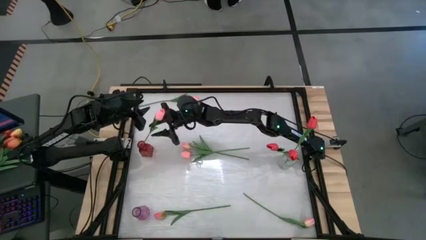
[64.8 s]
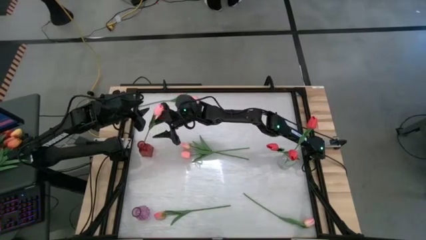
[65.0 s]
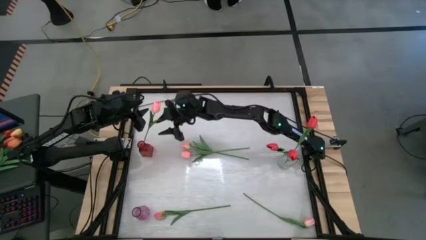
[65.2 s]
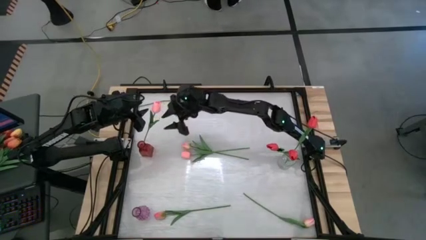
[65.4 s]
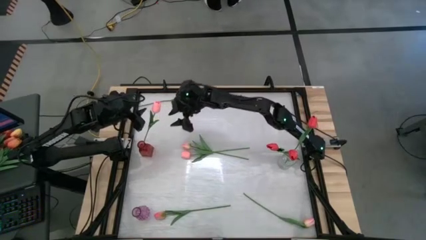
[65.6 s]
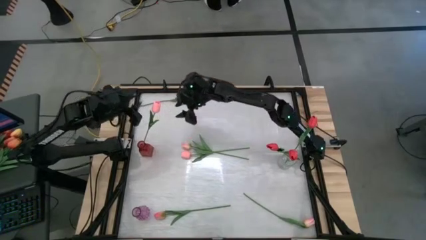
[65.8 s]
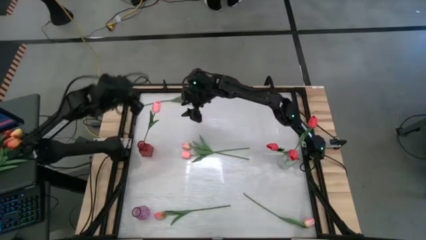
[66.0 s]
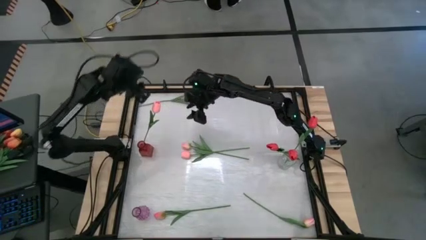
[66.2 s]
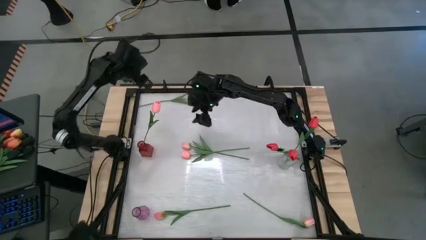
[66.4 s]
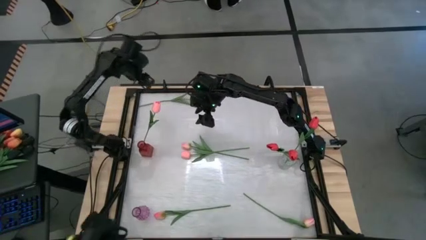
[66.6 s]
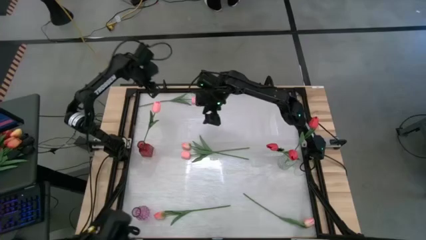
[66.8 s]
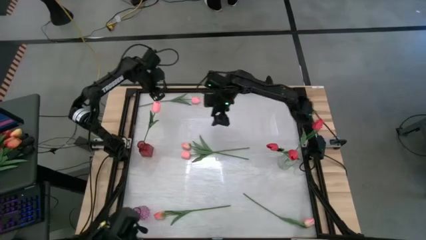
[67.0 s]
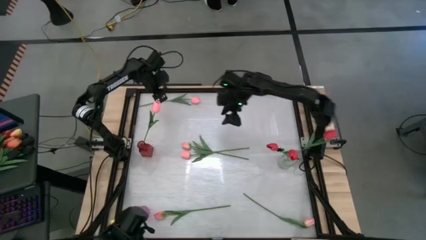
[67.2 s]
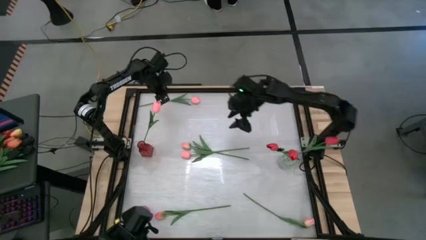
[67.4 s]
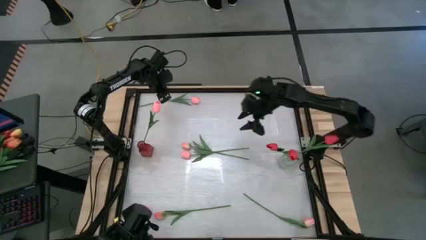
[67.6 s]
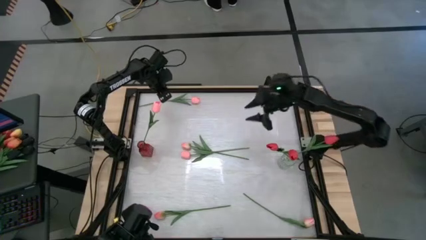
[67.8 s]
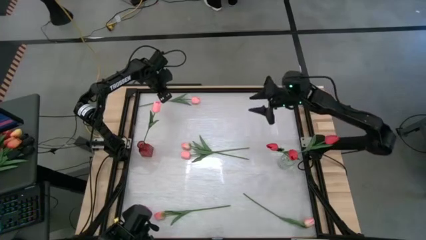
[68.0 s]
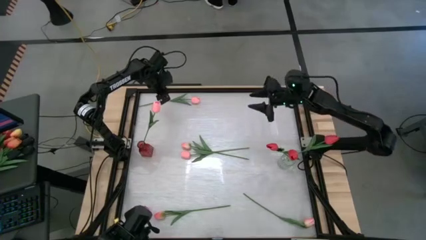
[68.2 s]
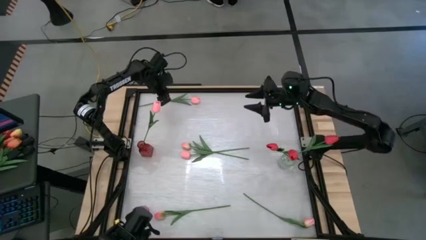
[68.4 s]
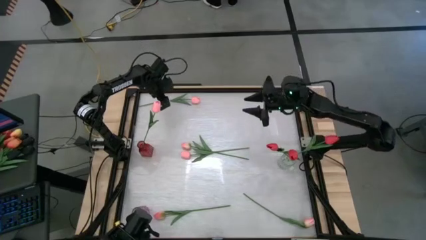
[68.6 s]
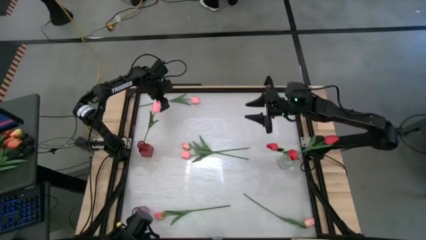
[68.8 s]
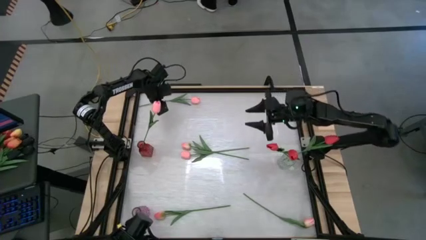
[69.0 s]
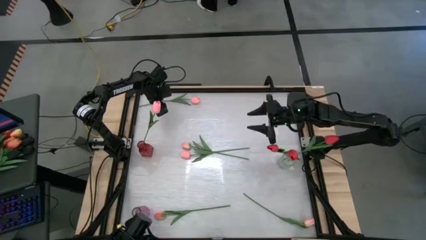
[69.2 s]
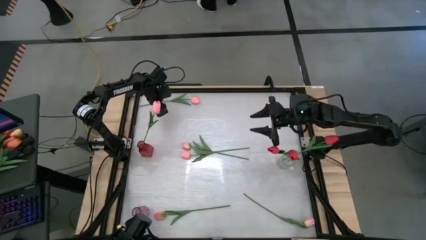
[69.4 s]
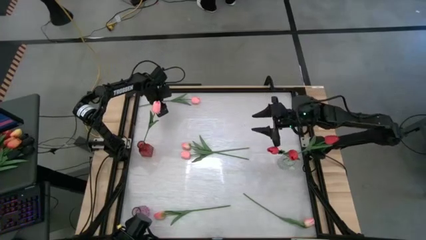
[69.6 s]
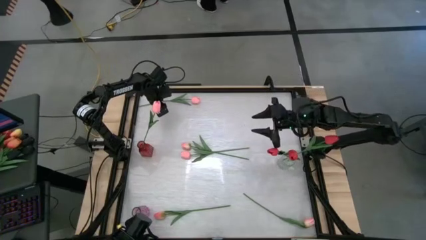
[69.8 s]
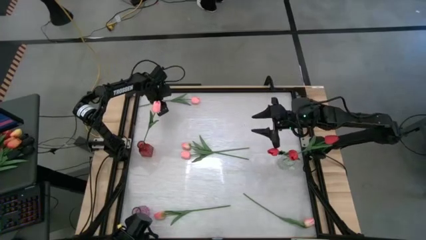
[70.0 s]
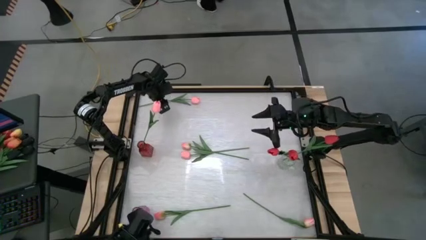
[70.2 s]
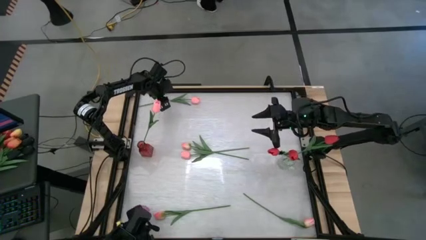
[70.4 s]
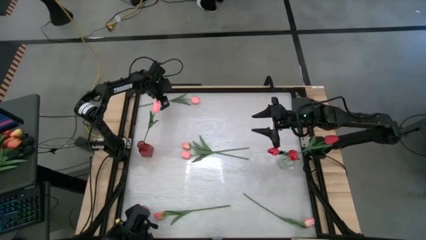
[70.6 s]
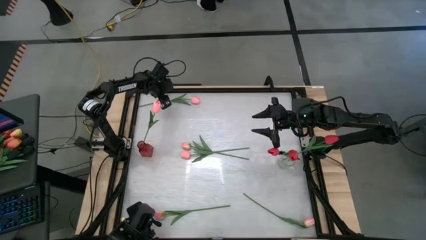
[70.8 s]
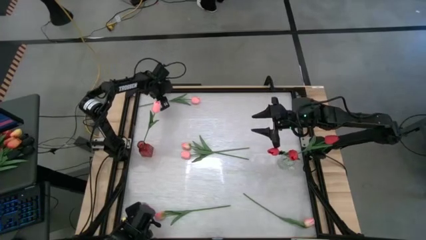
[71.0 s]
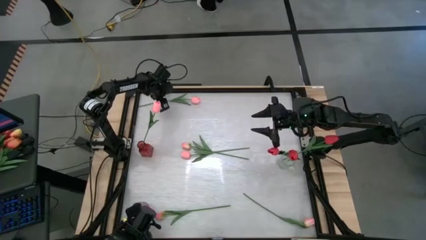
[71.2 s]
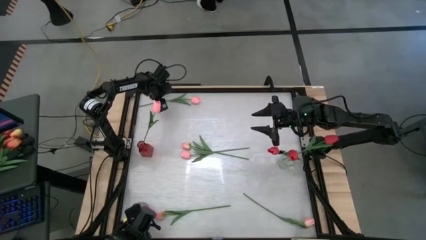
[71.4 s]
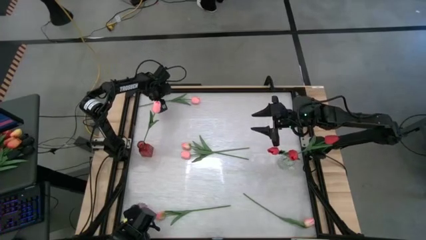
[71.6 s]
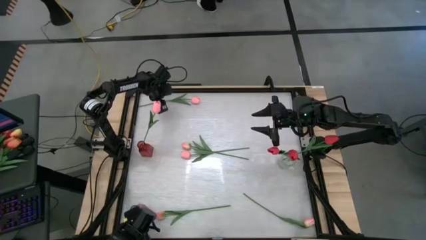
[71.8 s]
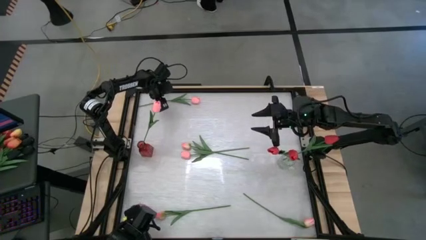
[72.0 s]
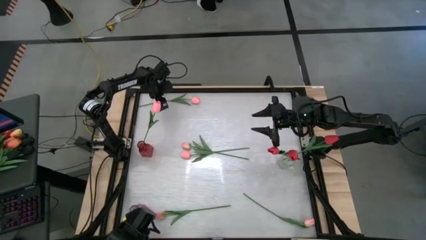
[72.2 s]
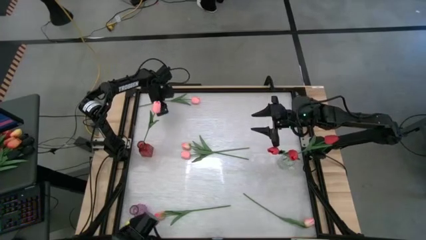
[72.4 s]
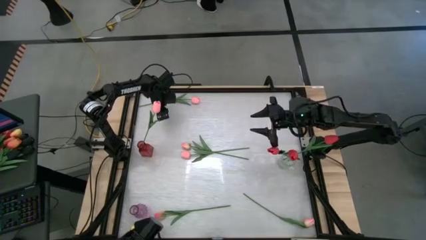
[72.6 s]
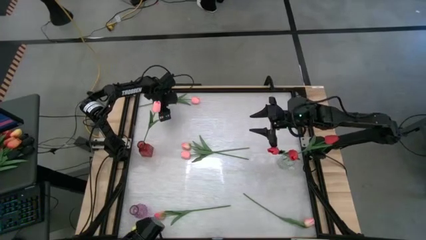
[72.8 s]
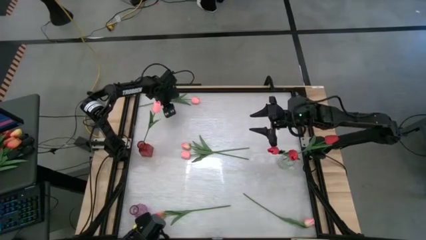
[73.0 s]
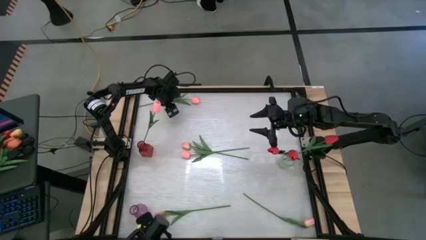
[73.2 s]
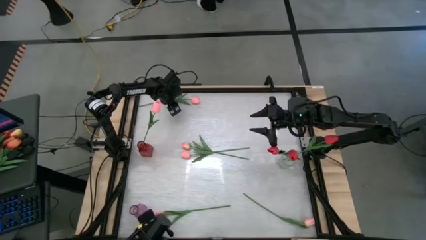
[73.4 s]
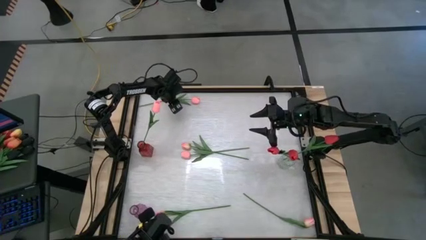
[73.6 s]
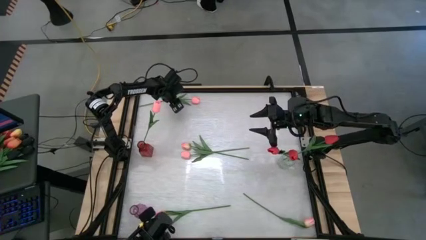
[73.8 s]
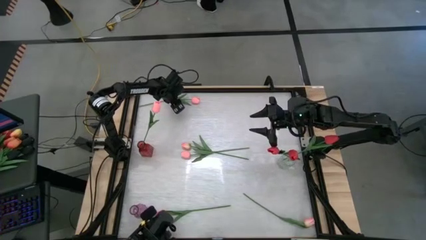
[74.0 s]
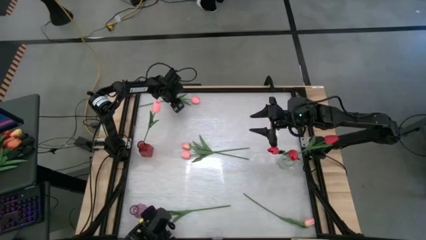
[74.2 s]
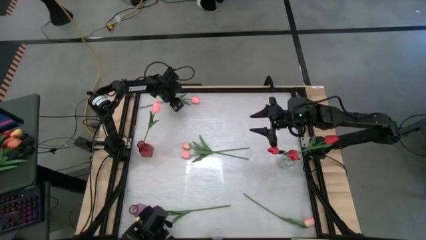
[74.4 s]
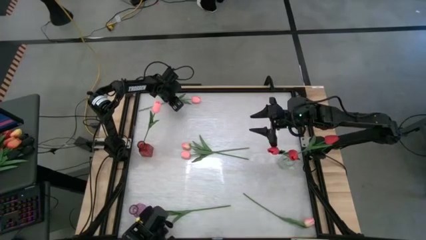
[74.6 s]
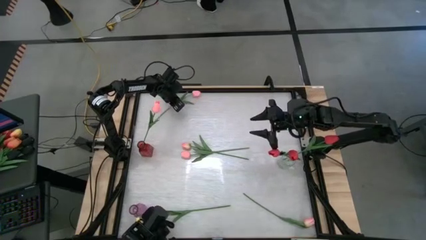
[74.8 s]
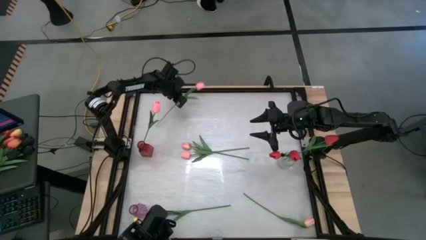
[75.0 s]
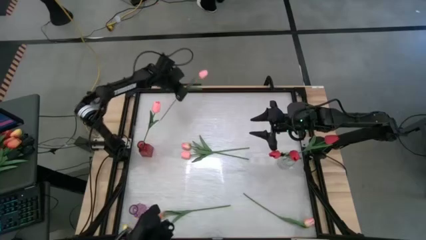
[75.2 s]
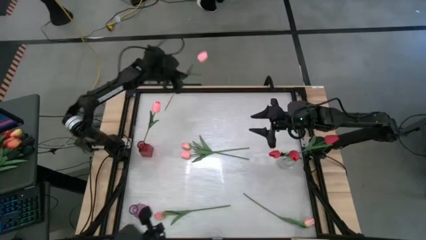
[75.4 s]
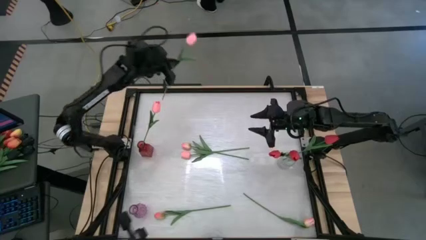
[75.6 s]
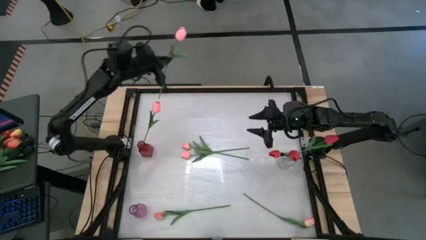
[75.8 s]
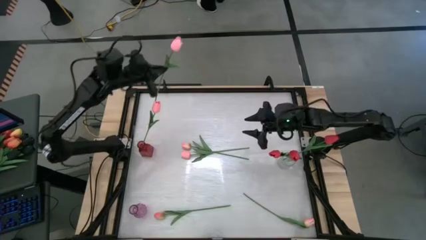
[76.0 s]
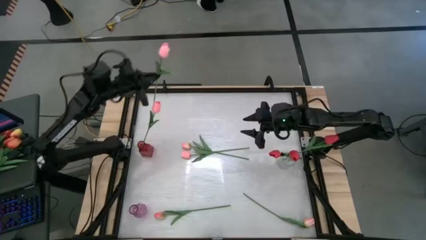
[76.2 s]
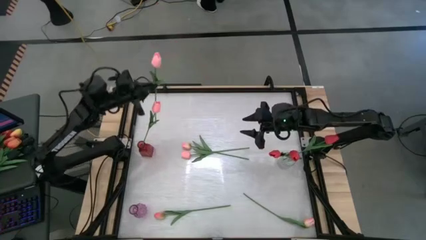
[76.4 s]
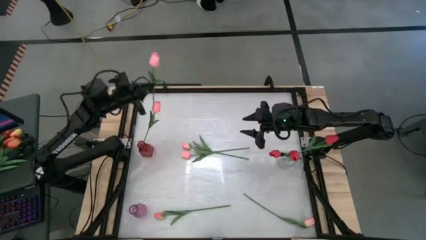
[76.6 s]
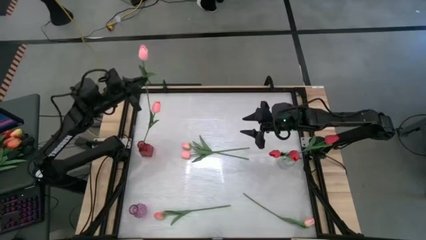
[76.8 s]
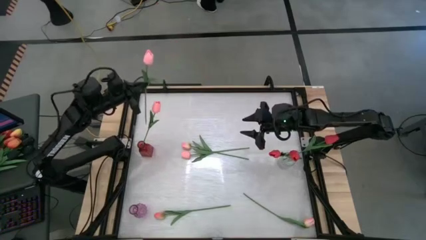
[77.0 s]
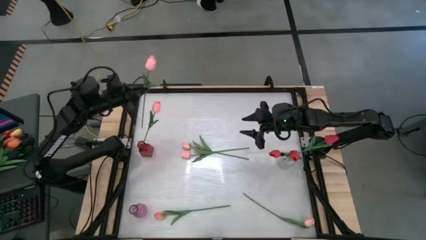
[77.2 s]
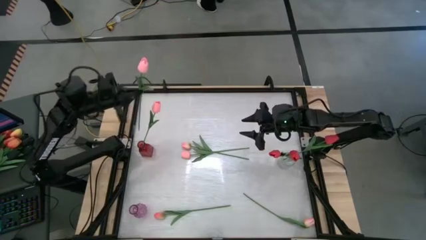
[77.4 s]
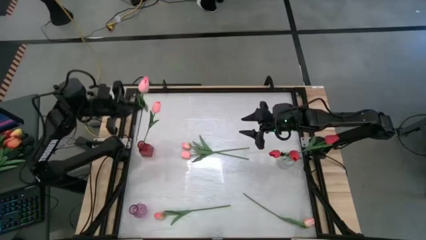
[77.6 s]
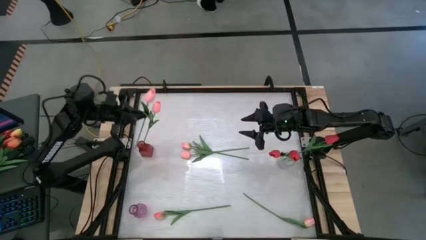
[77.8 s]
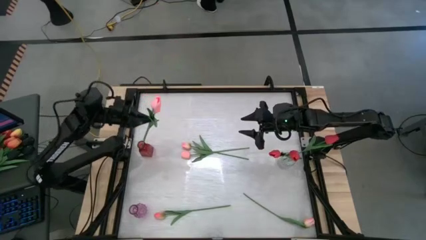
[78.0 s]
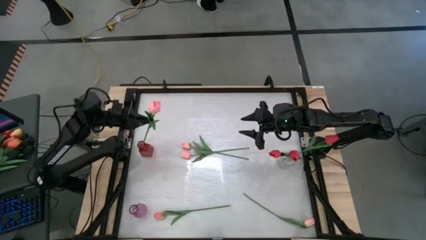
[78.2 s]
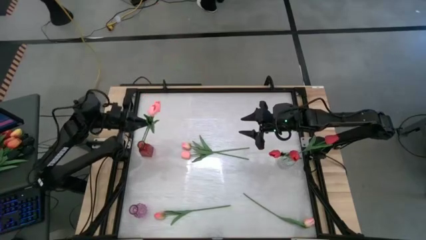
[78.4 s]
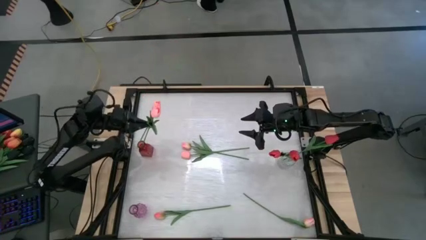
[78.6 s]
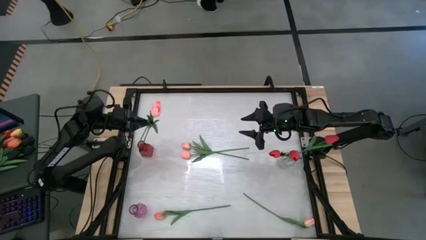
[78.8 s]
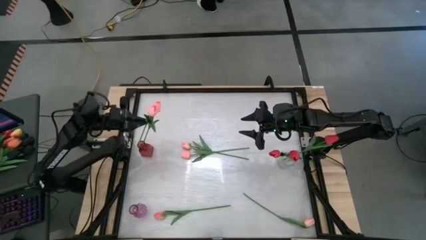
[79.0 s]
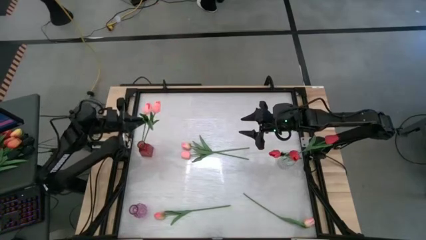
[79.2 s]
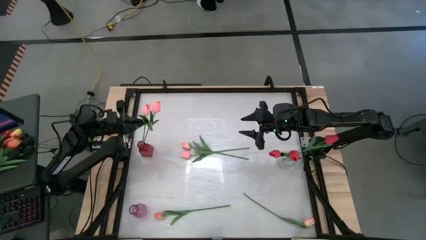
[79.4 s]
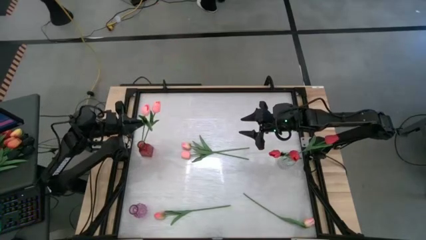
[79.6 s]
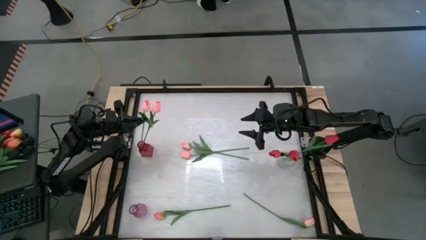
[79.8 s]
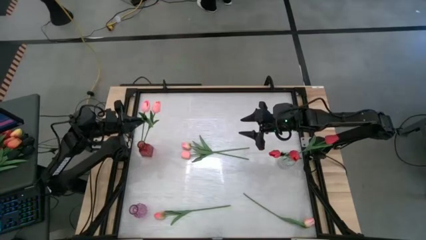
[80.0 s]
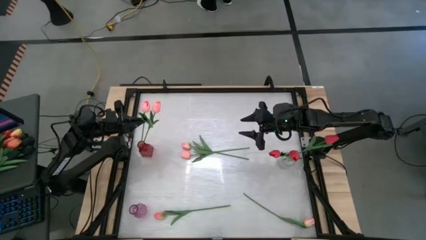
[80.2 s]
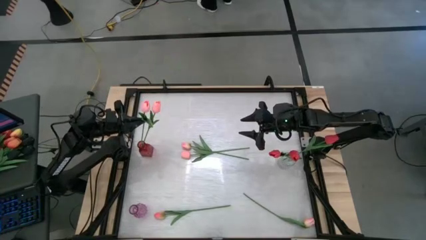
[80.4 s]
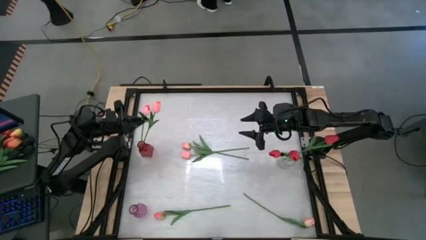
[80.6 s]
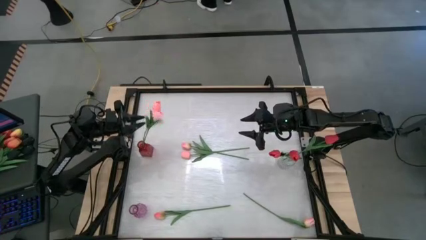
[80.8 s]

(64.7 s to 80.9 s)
Task: Sort flowers into vase by color
Put the top pink flower into the red flower vase
